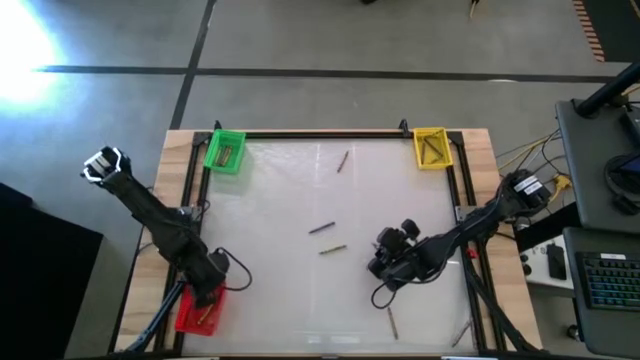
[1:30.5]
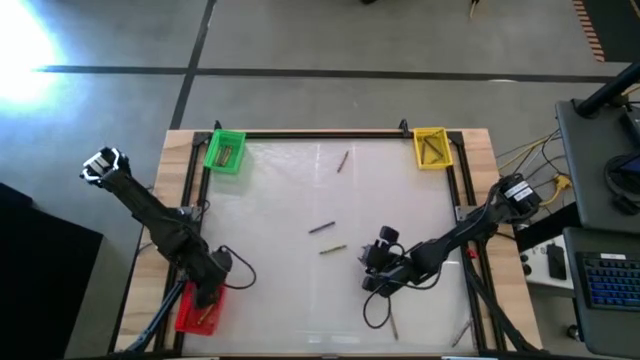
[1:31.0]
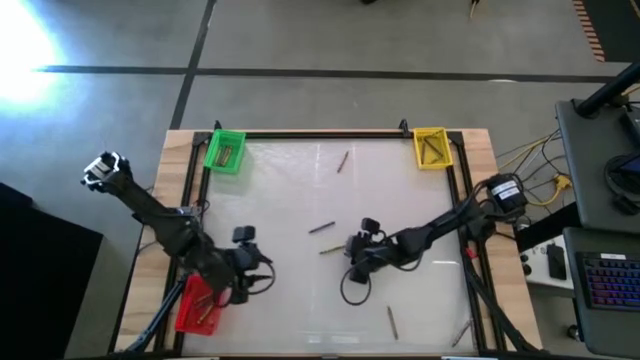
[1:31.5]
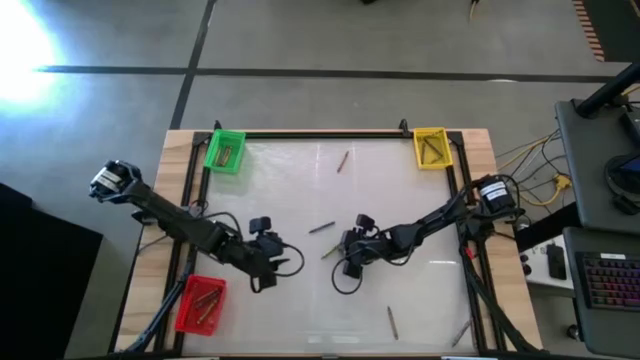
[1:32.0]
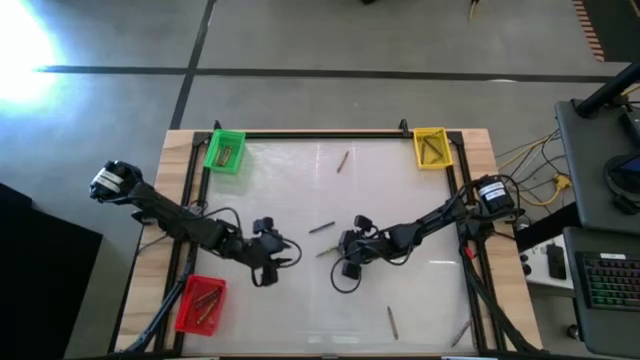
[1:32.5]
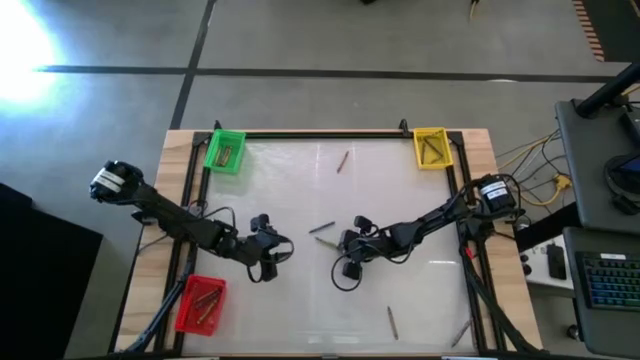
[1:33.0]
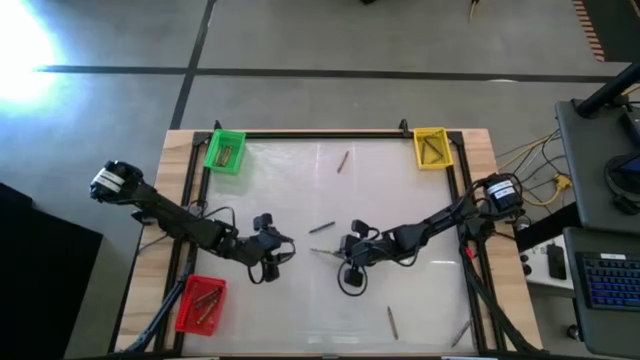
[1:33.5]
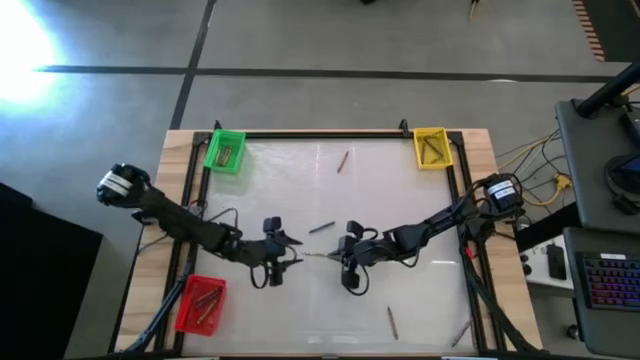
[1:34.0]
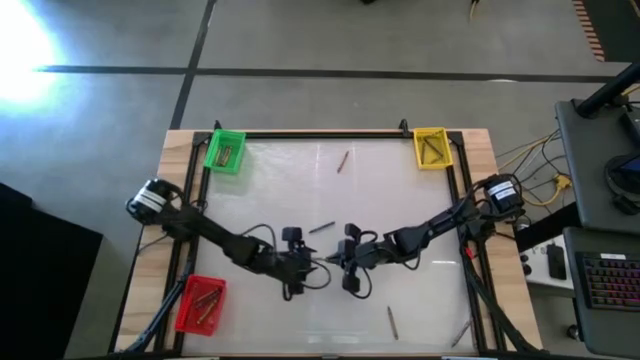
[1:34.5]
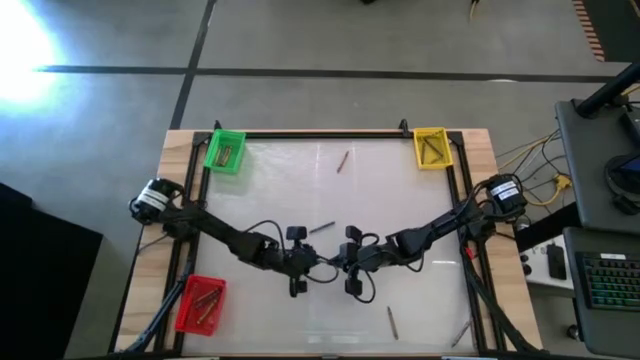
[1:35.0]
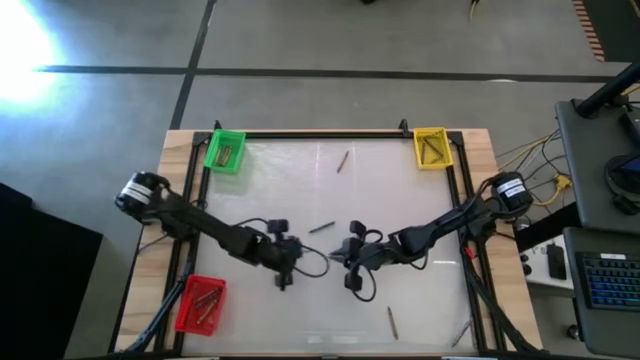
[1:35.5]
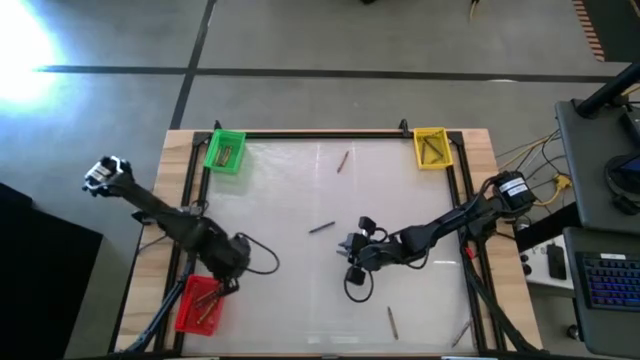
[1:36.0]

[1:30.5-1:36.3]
Task: Sort crayons
Put the green crayon into the red basket

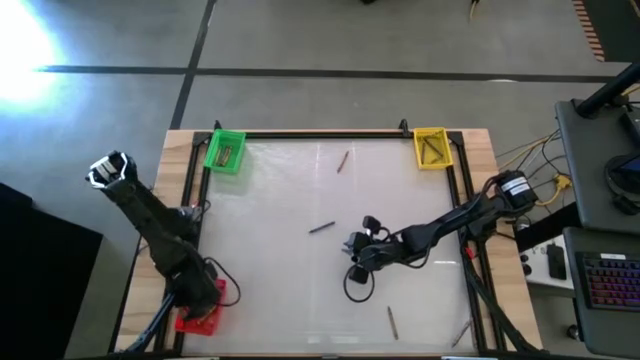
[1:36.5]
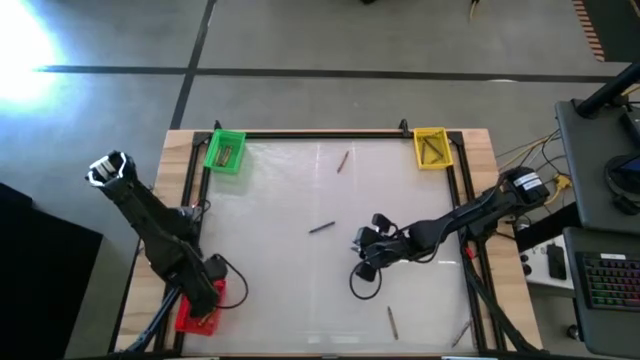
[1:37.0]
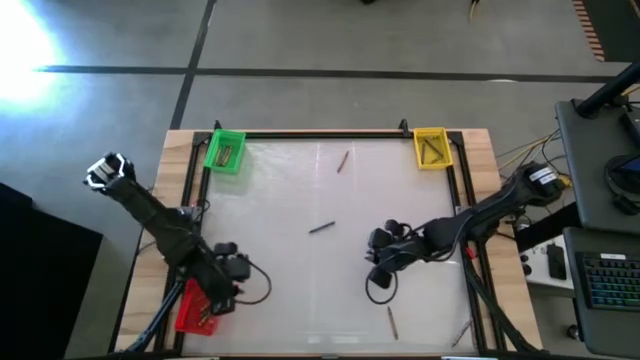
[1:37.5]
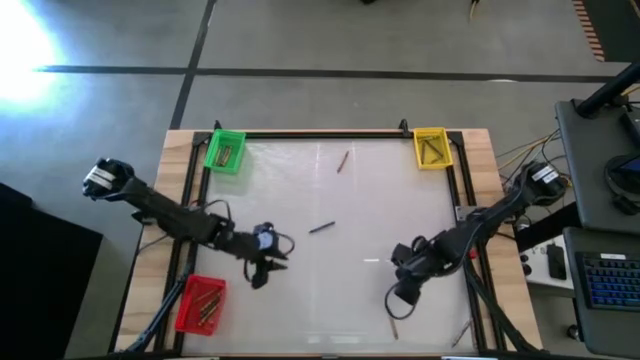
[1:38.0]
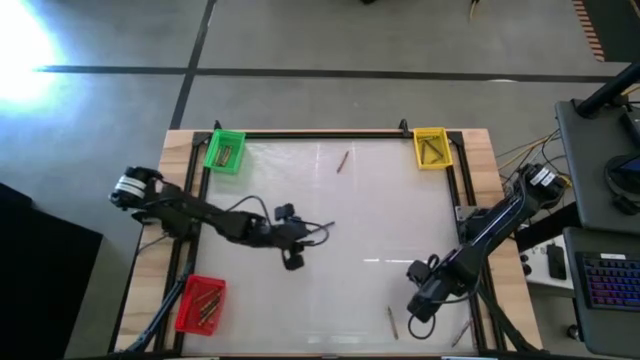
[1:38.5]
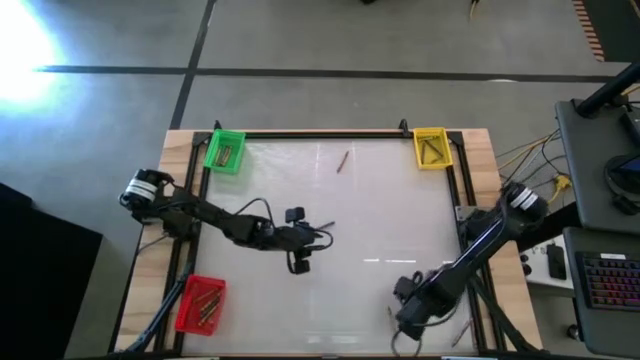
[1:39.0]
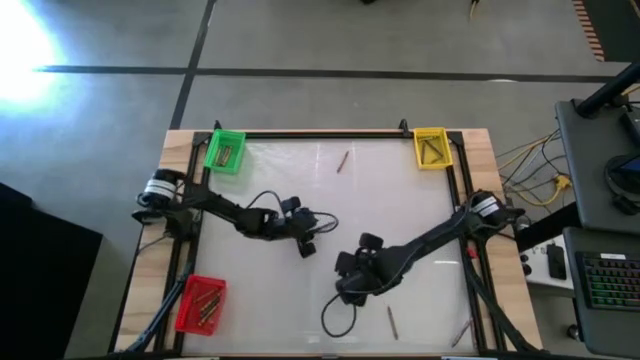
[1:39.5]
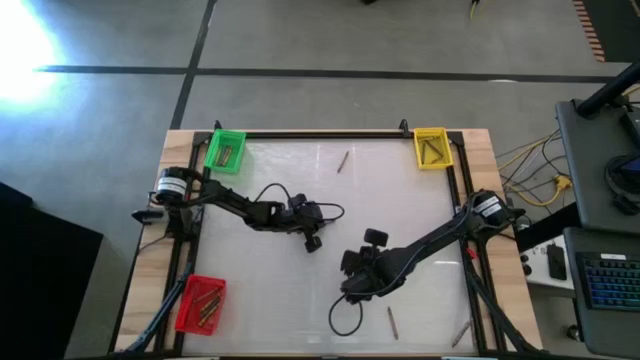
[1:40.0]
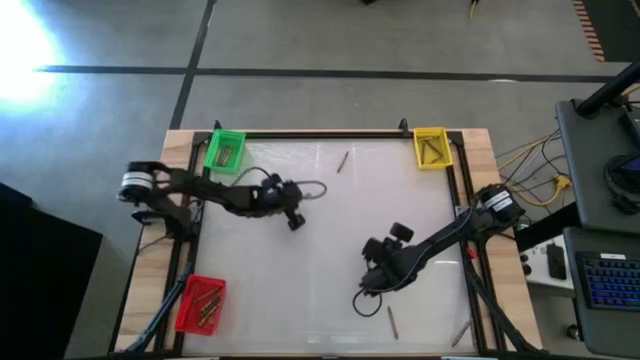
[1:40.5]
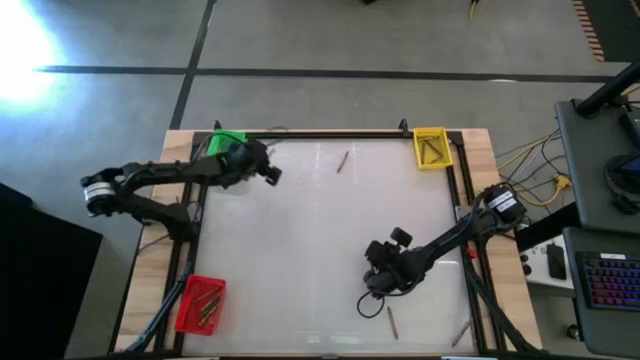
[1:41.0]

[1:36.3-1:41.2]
Put the blue crayon into the green basket

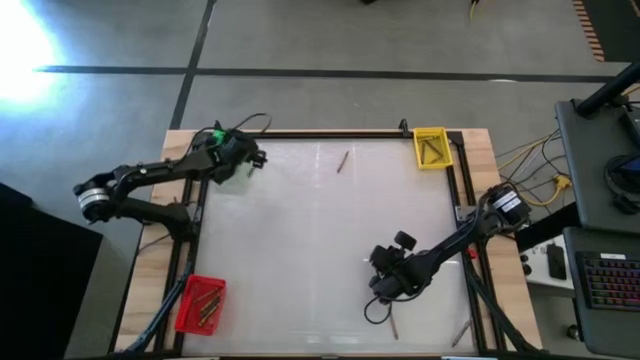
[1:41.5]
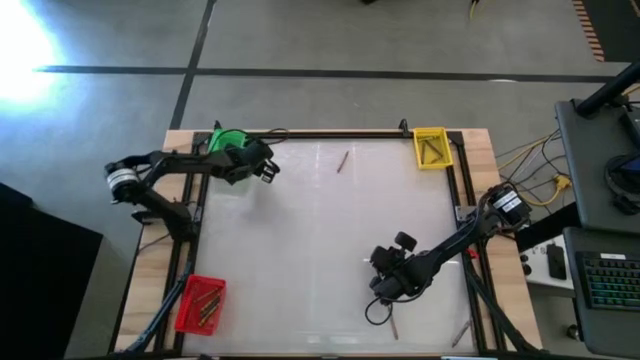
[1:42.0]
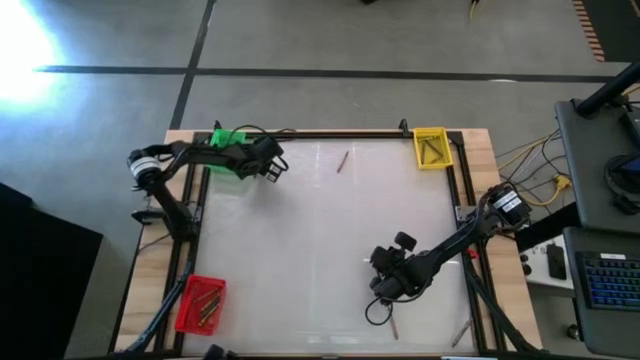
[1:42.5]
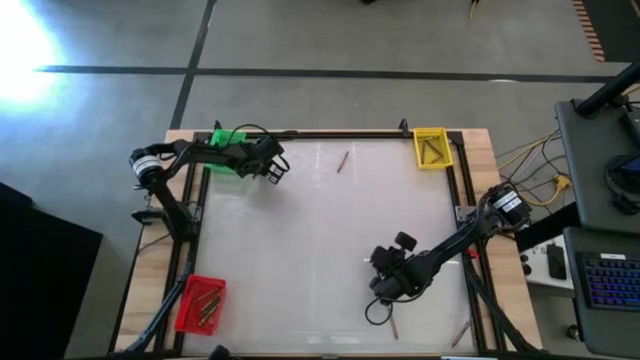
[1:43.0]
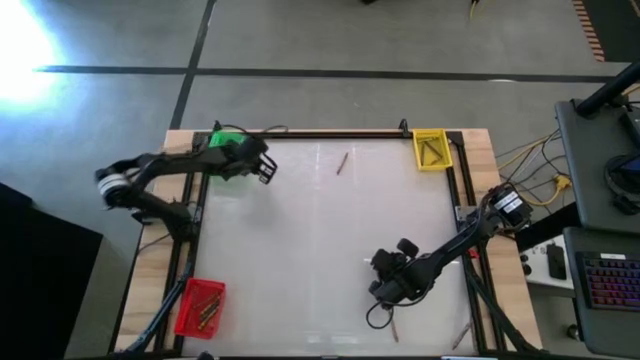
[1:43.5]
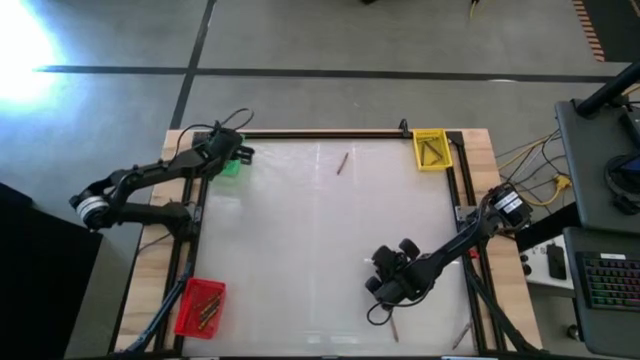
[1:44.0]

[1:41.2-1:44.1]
Put the blue crayon into the green basket

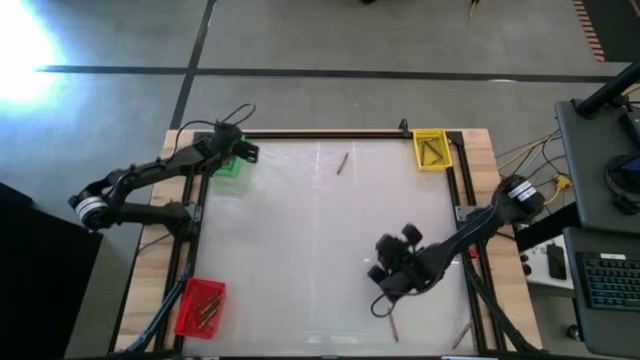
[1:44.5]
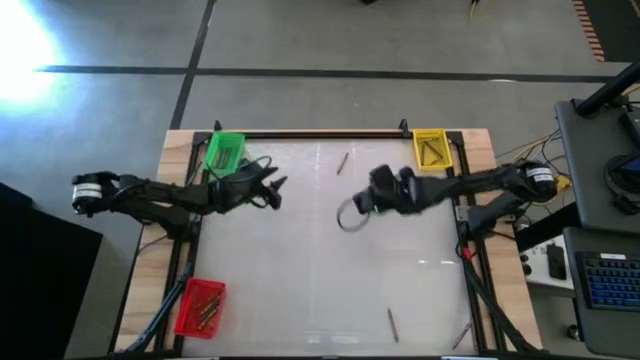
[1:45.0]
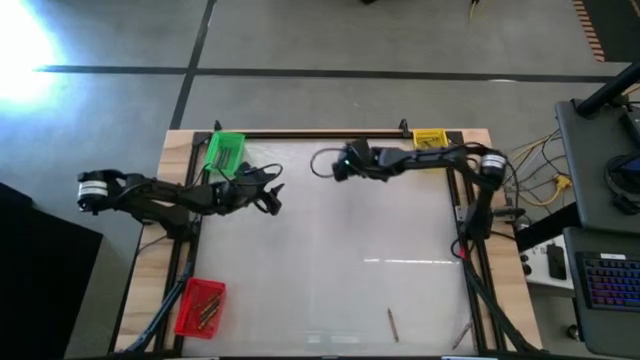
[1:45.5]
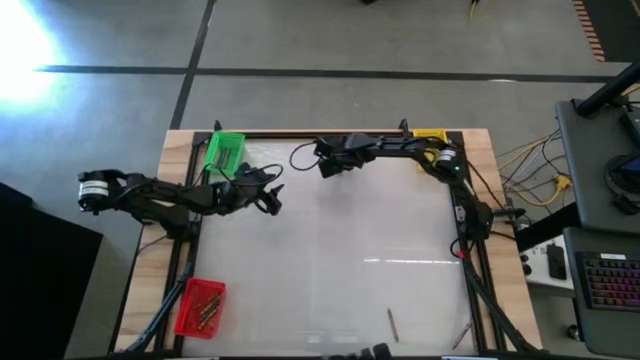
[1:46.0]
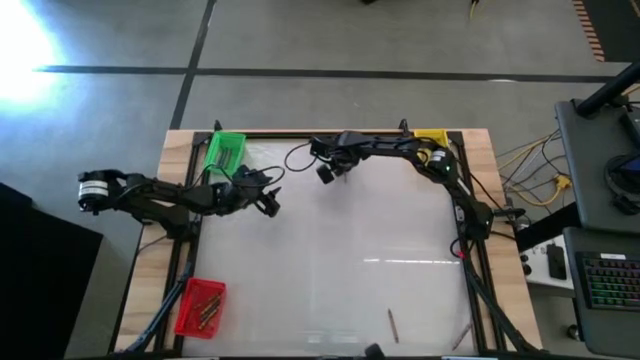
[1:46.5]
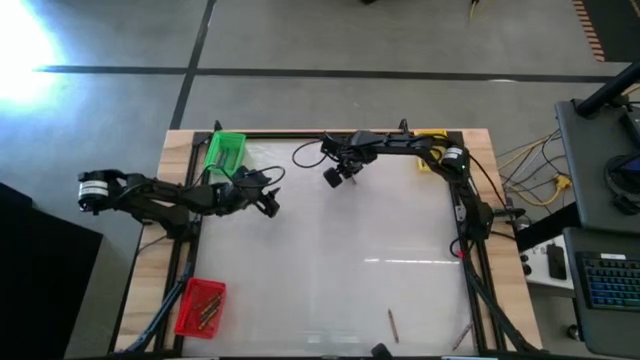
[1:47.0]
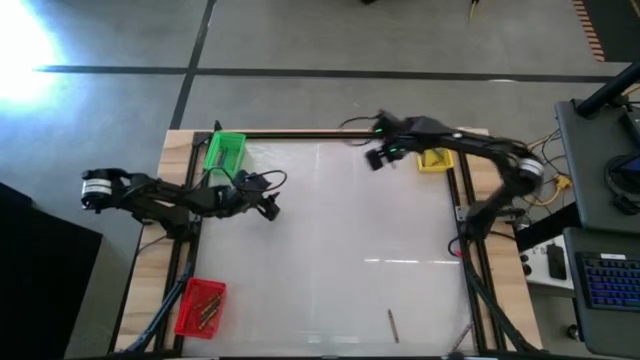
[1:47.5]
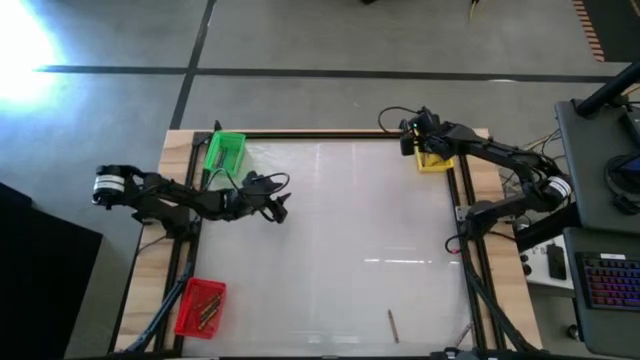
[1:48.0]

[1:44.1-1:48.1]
Put the brown crayon into the yellow basket

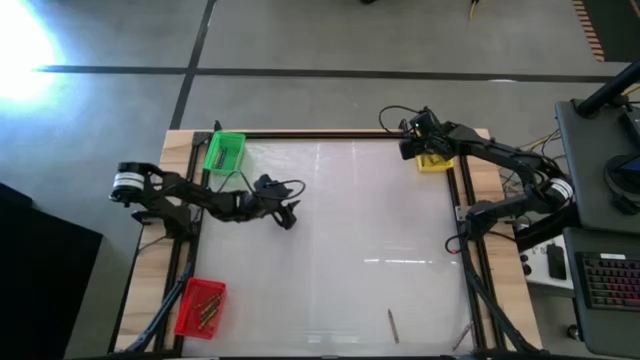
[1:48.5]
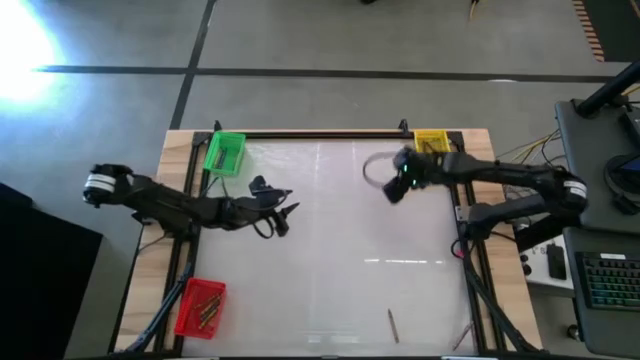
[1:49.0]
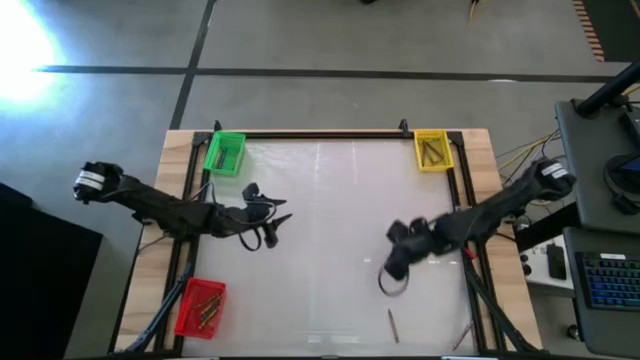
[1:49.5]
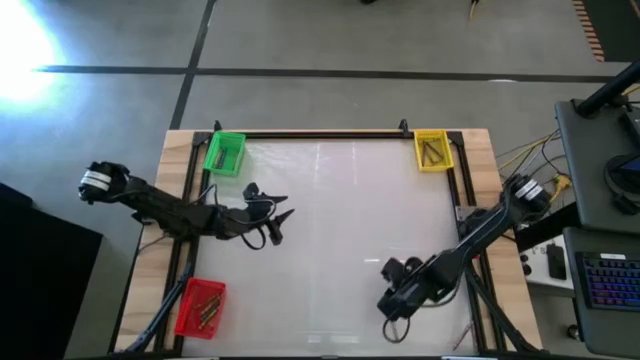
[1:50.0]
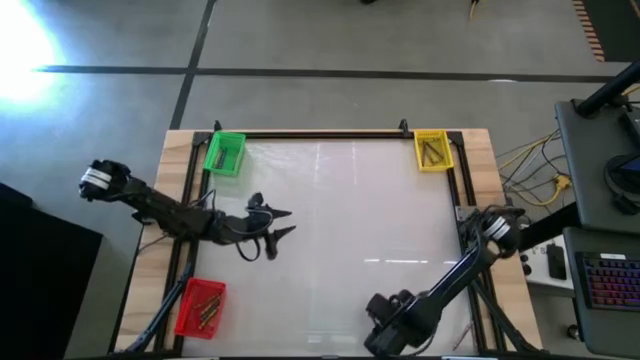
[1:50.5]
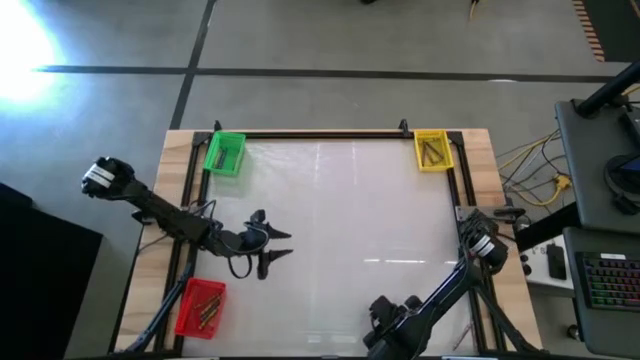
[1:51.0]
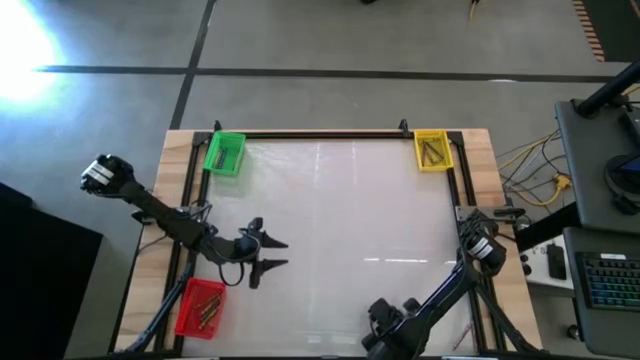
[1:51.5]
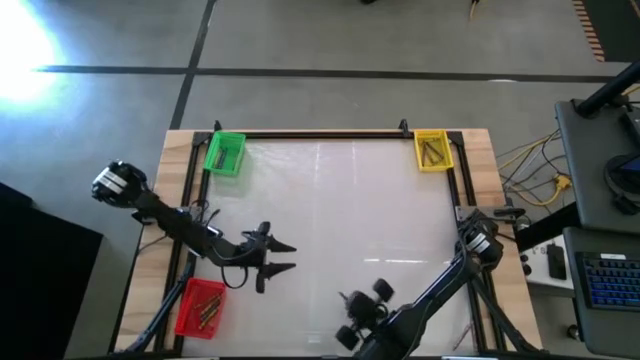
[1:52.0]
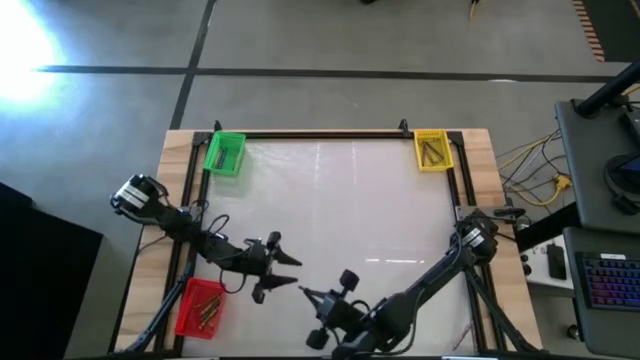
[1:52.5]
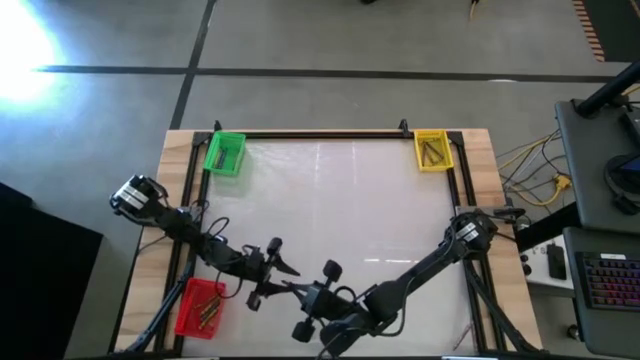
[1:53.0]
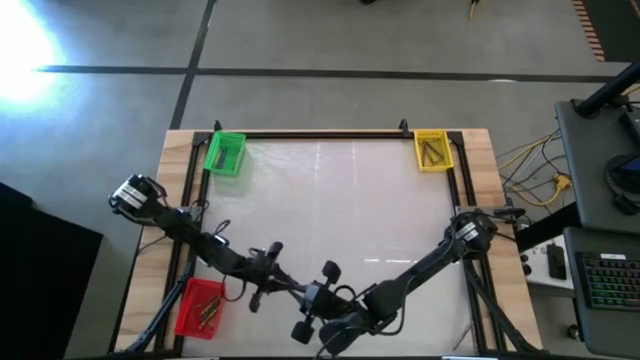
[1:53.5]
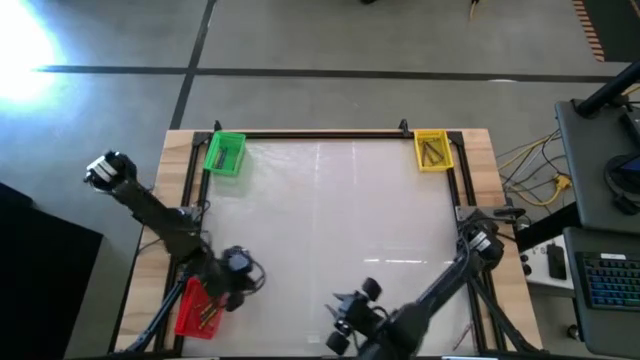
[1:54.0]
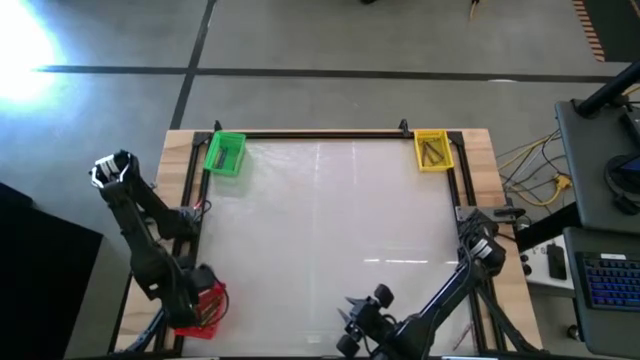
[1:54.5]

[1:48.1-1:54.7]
Put the brown crayon into the red basket
